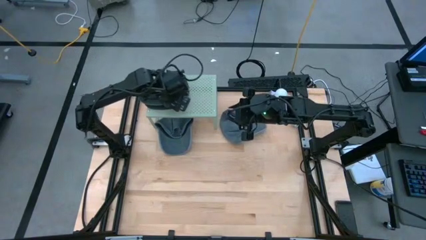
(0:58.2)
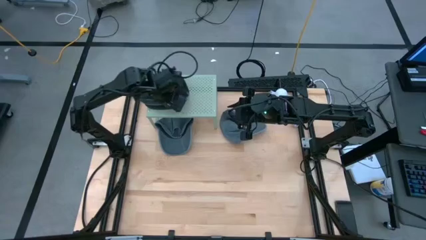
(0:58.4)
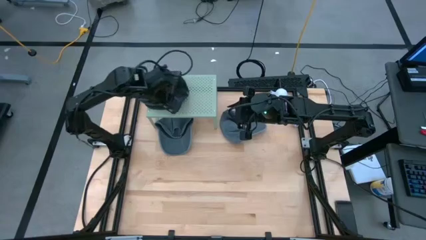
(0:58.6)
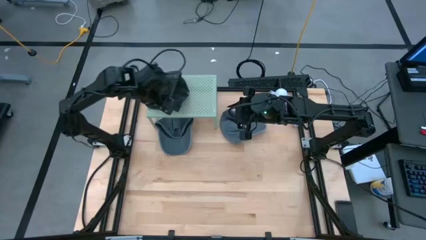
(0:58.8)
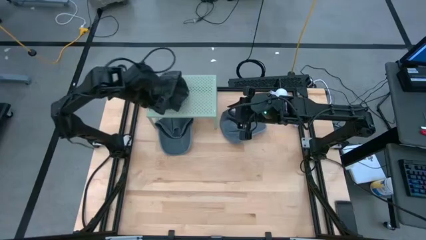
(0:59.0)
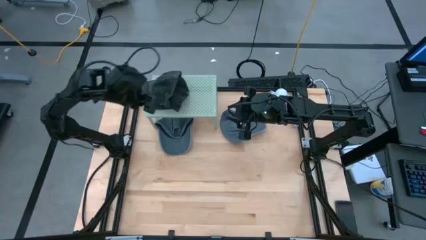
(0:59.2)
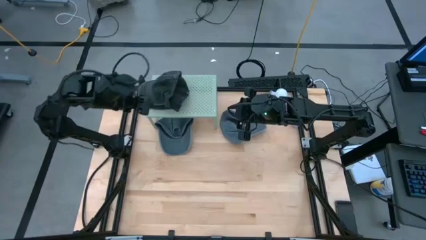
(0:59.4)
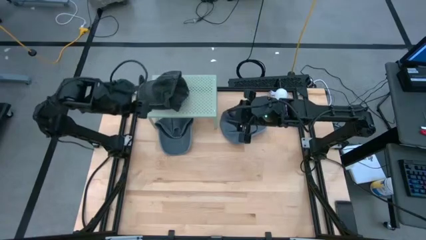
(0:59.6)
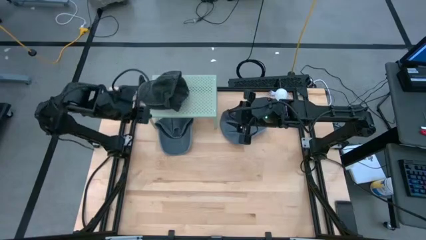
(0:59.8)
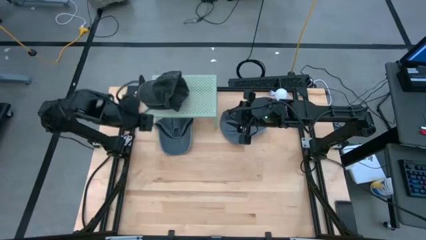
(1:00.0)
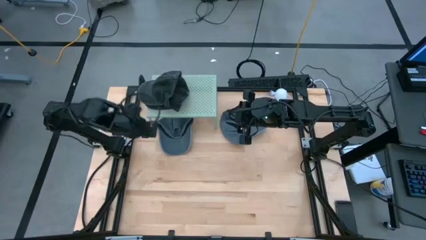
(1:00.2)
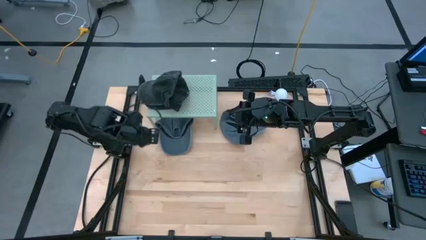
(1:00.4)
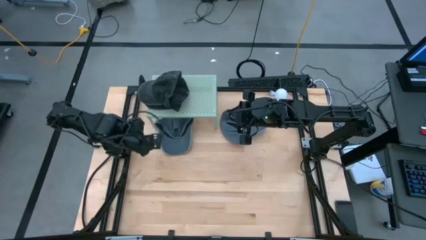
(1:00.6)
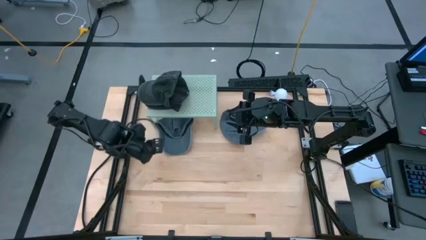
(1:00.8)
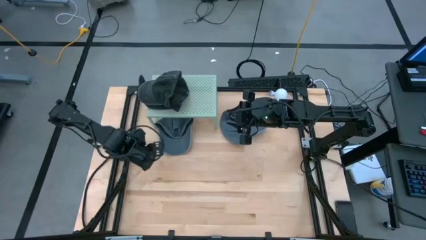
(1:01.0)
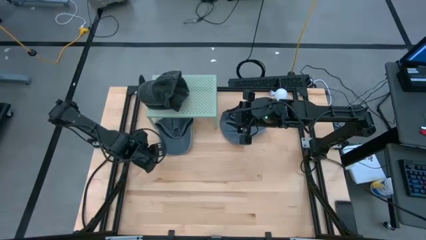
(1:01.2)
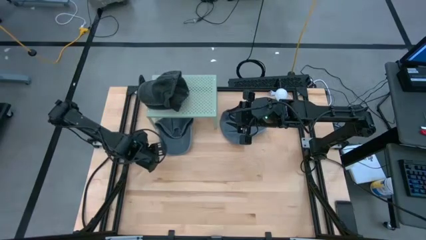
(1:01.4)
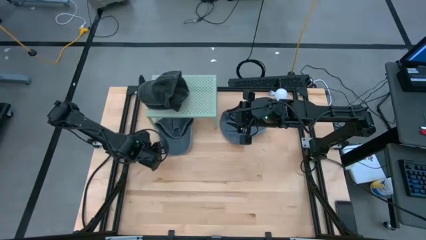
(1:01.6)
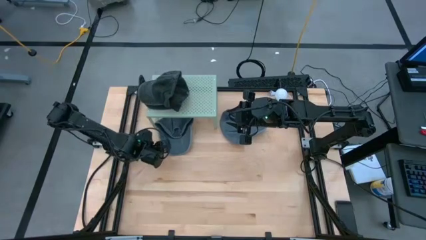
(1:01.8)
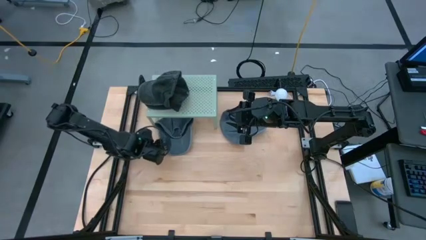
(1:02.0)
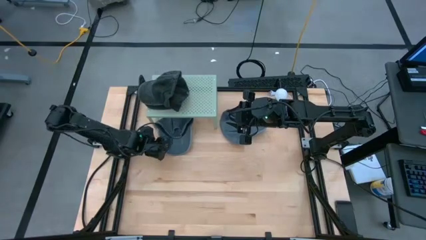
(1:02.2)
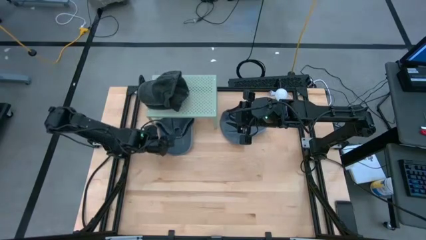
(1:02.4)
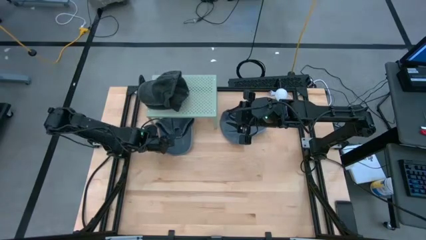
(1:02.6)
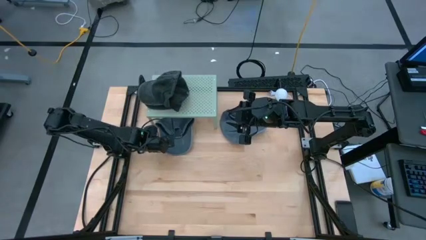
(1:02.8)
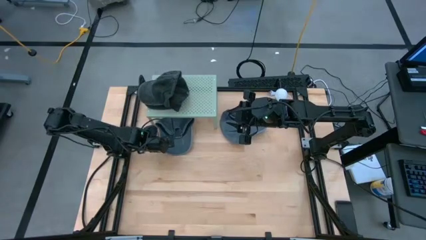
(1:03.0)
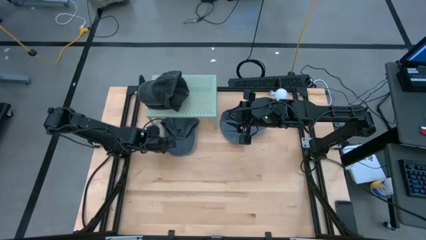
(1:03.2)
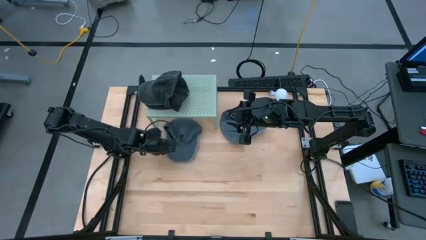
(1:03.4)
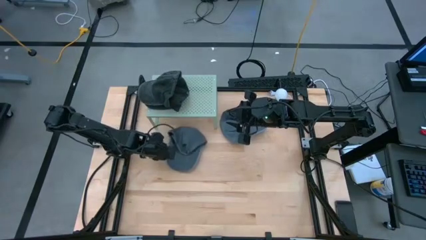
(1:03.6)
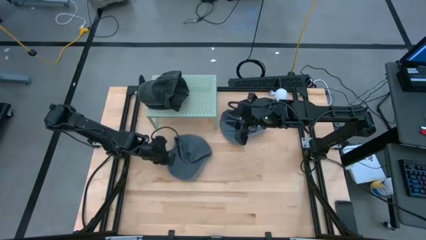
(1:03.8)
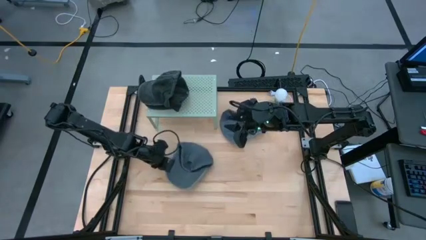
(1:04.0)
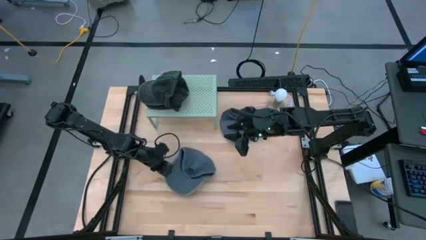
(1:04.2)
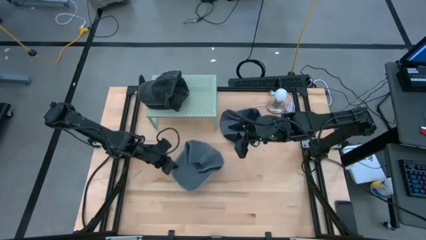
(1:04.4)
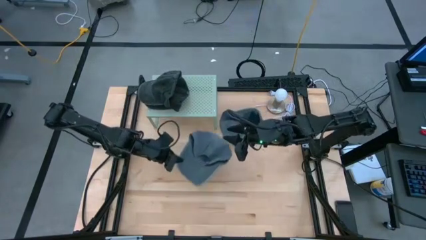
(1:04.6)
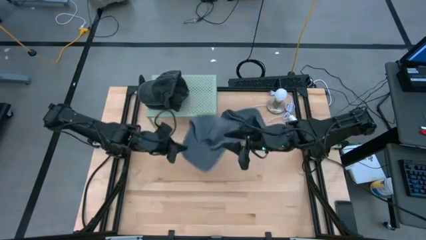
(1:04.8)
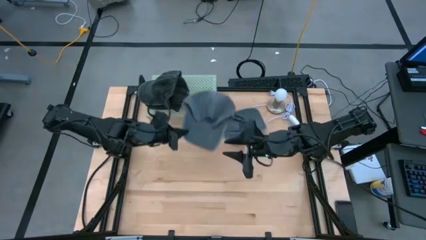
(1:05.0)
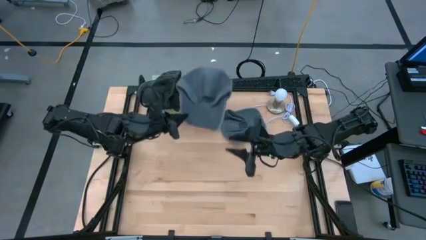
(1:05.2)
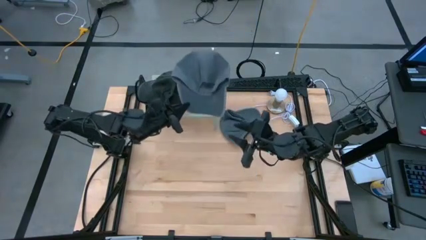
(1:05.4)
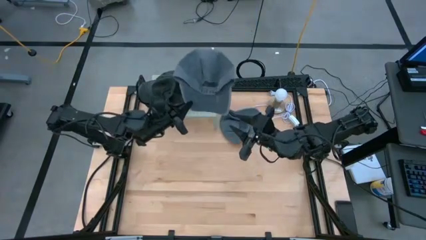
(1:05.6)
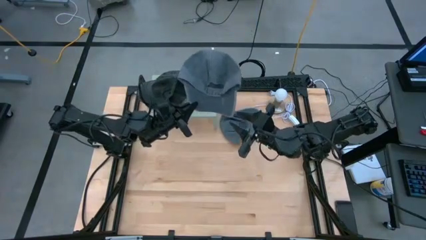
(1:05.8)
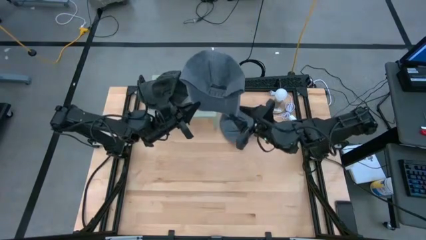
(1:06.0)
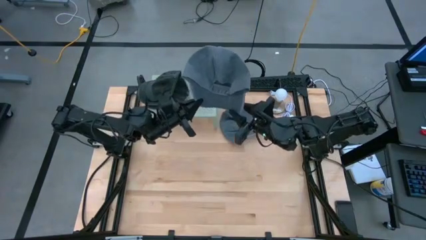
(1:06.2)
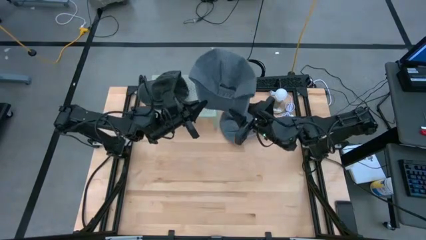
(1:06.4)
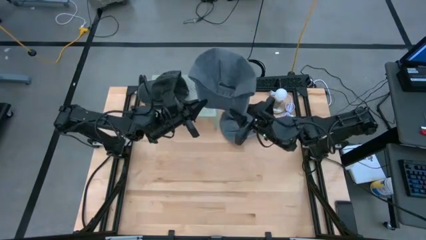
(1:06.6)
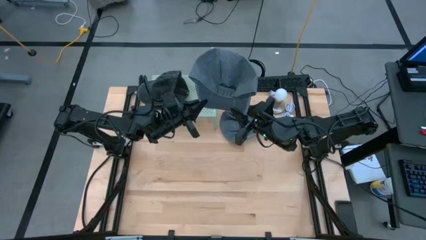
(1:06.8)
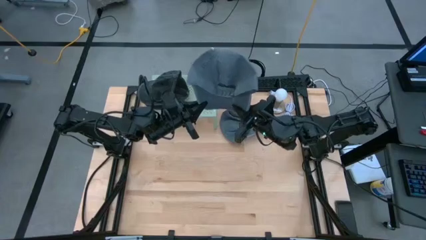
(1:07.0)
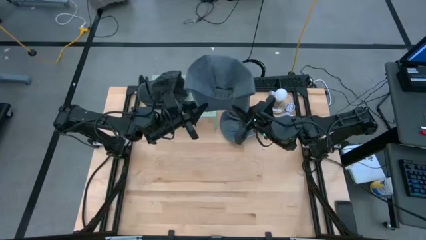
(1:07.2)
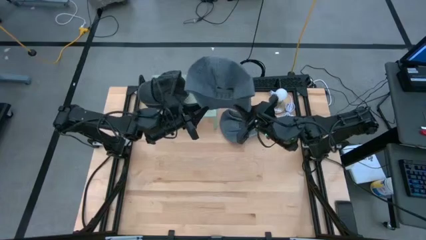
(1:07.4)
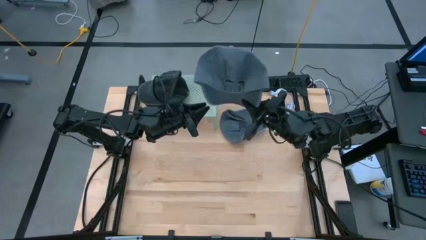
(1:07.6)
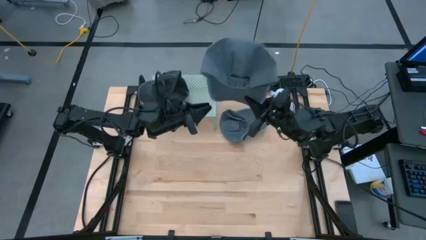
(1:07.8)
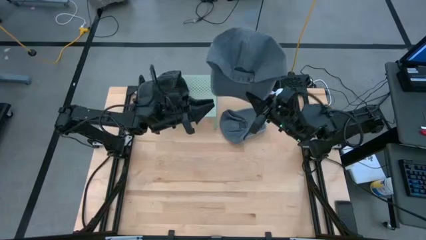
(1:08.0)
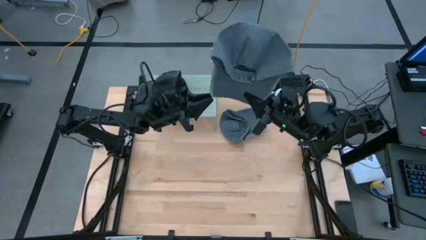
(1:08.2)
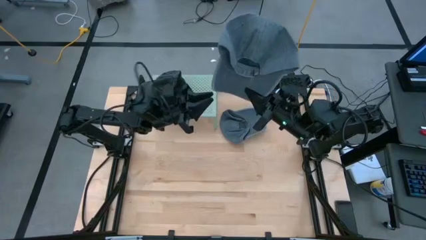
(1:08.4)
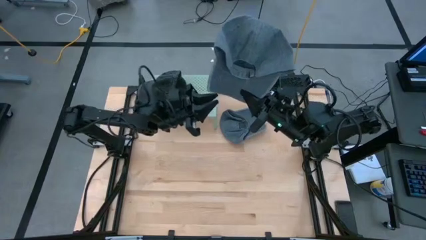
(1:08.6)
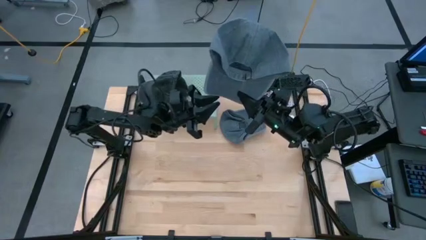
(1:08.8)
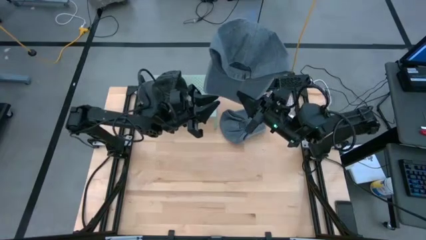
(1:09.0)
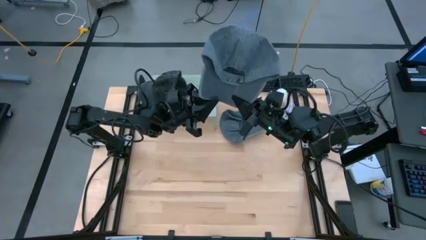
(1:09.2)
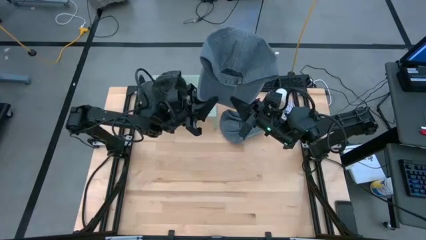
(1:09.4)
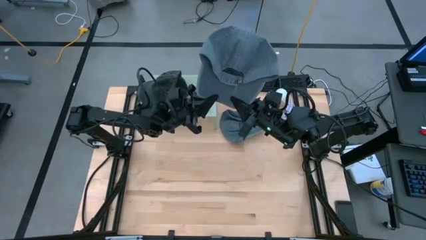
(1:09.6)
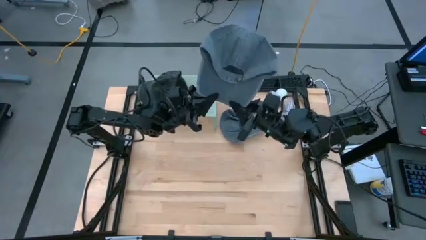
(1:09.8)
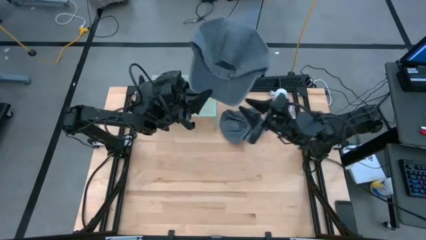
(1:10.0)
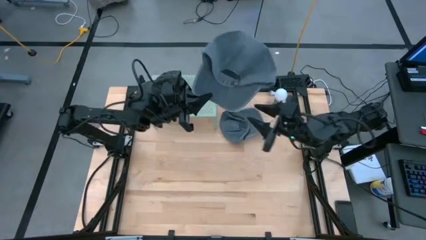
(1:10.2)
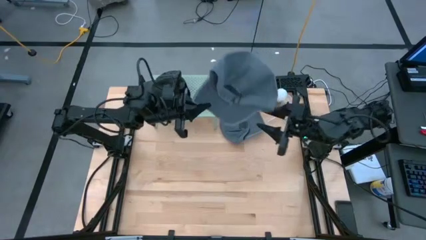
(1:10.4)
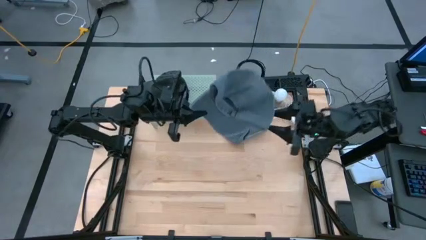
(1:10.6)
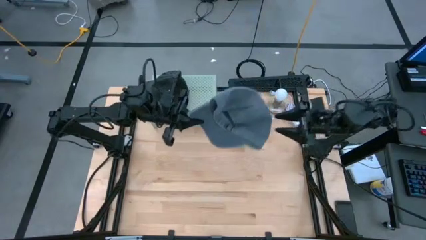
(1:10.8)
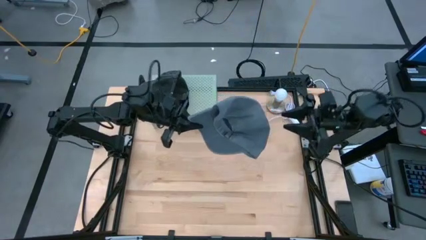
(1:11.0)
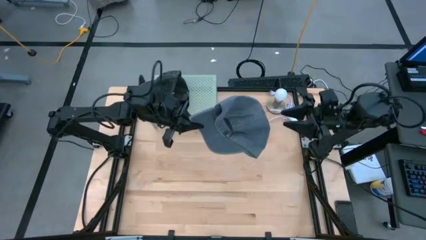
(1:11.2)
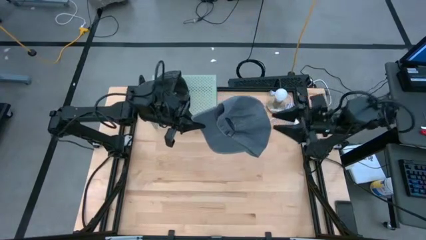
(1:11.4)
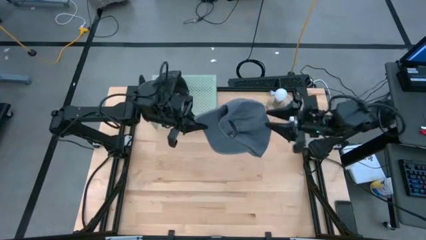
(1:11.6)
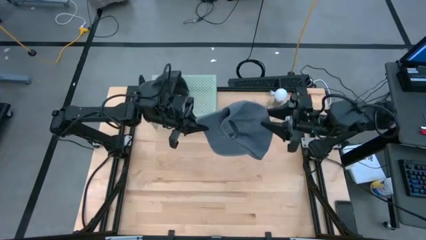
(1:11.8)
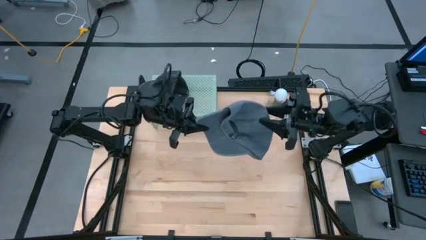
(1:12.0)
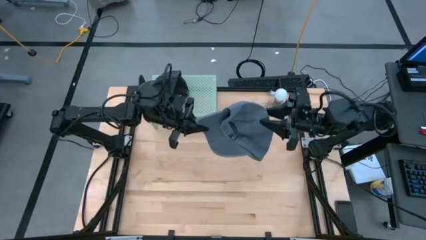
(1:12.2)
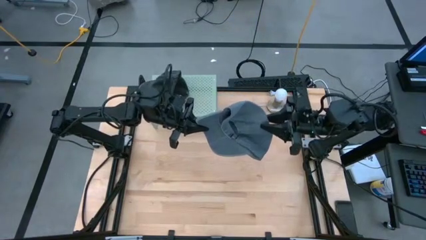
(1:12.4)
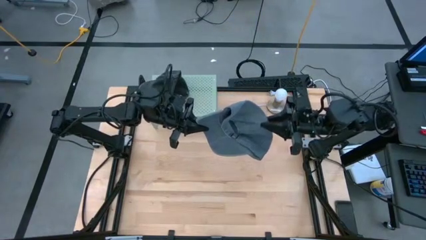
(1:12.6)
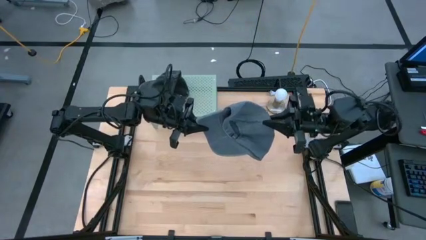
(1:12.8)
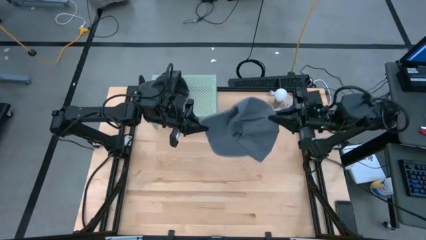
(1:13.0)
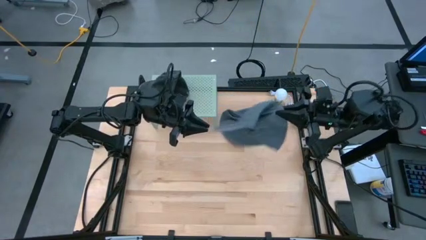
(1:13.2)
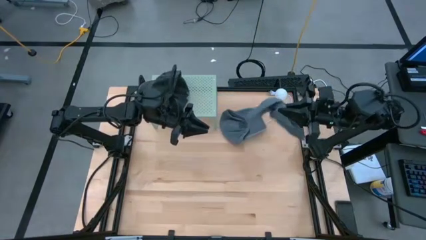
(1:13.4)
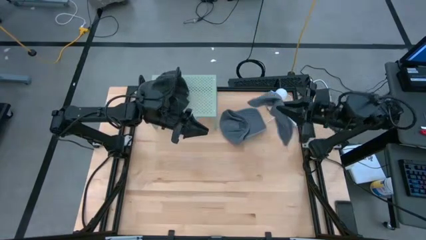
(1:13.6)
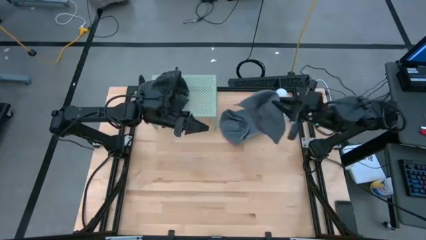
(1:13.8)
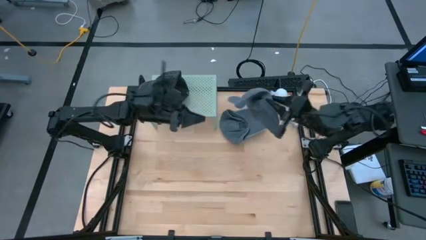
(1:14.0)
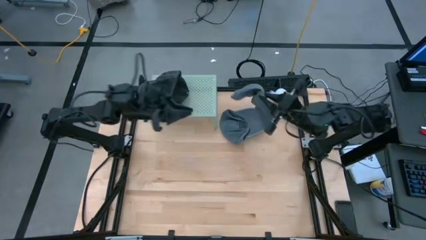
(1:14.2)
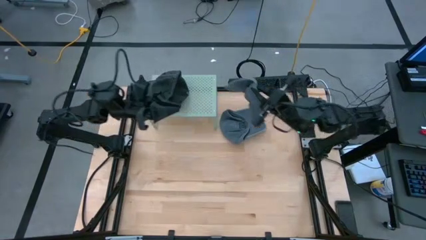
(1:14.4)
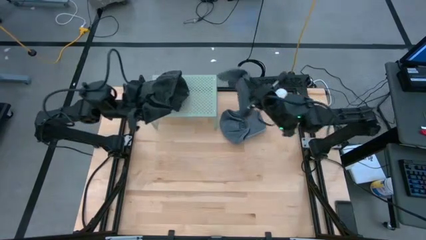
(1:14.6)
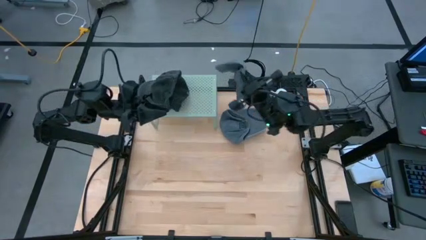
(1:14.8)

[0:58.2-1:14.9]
Task: Pick & Place hat
Put the gray cap on the shelf
